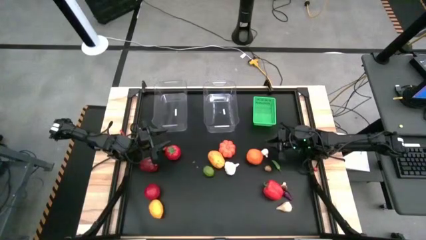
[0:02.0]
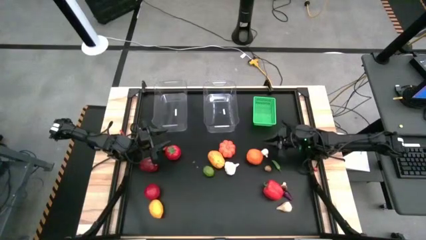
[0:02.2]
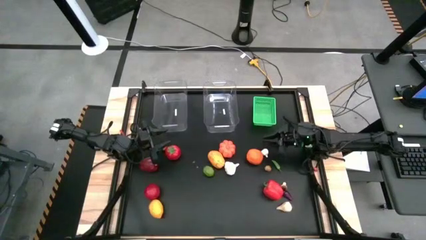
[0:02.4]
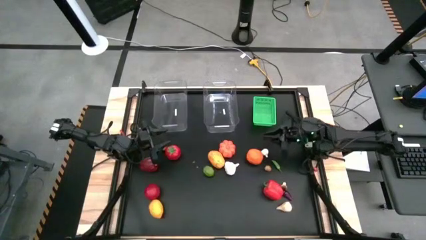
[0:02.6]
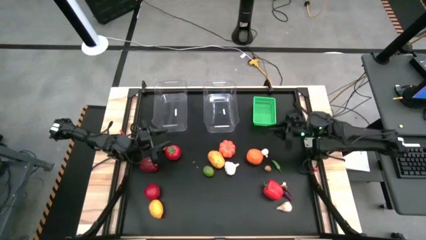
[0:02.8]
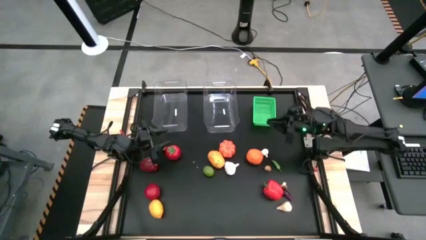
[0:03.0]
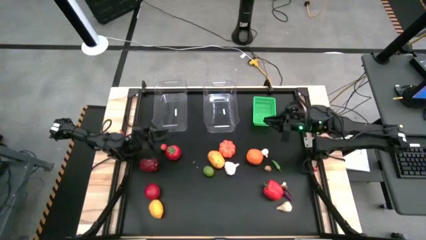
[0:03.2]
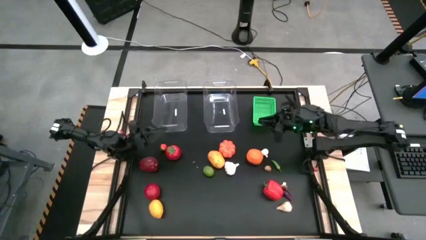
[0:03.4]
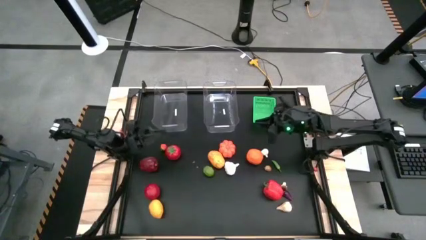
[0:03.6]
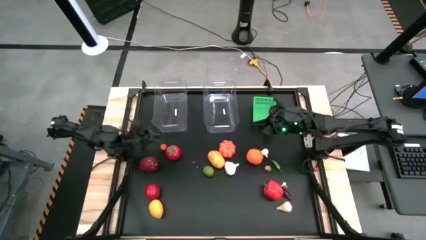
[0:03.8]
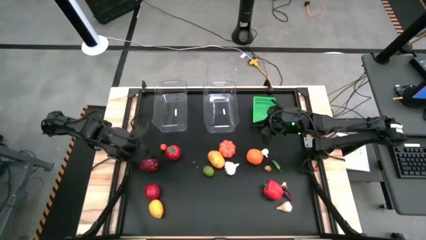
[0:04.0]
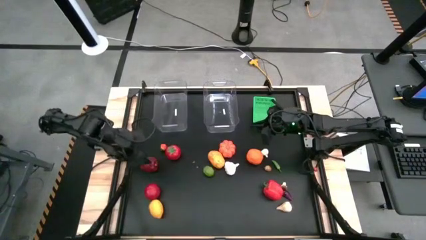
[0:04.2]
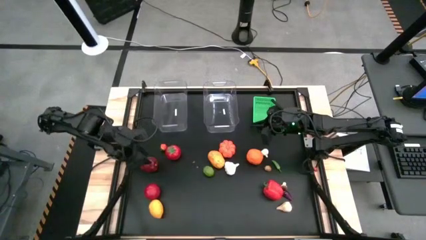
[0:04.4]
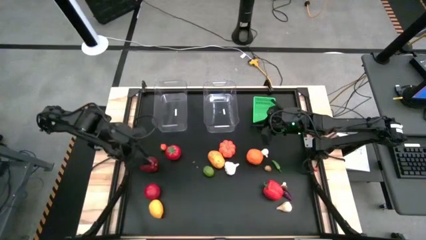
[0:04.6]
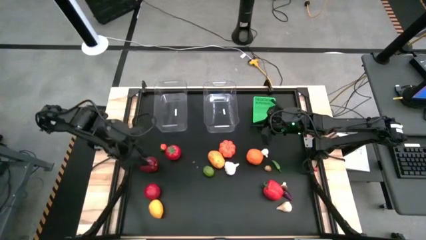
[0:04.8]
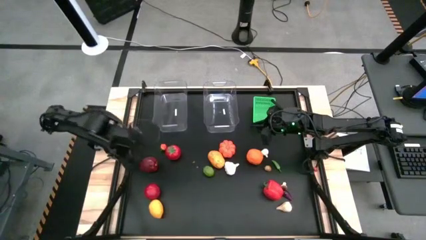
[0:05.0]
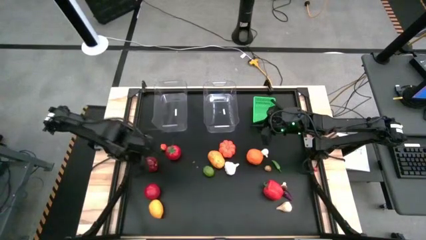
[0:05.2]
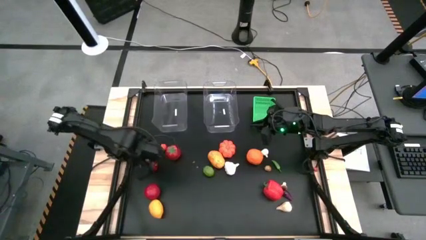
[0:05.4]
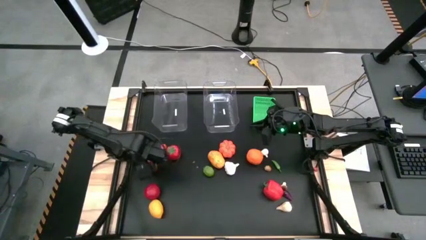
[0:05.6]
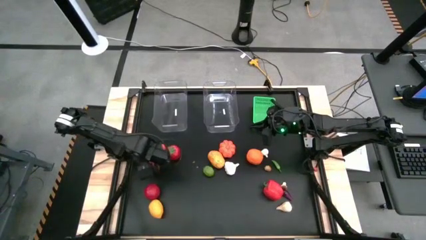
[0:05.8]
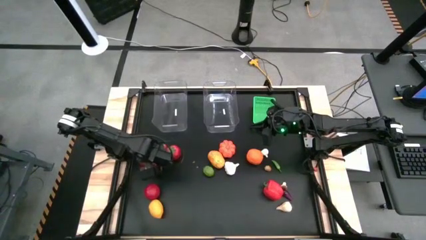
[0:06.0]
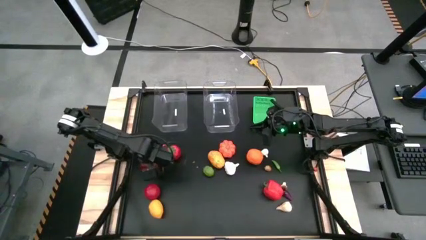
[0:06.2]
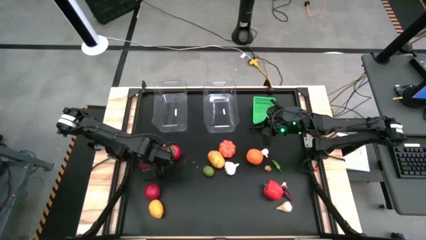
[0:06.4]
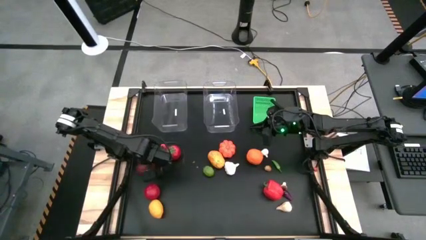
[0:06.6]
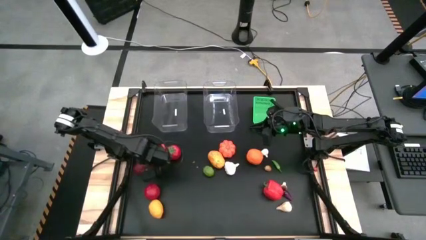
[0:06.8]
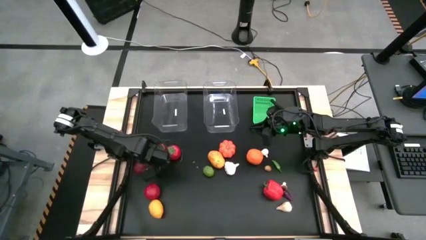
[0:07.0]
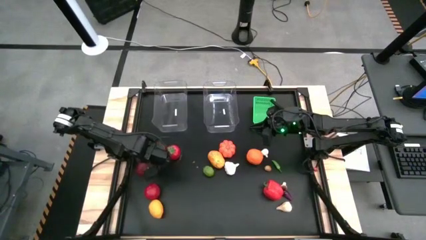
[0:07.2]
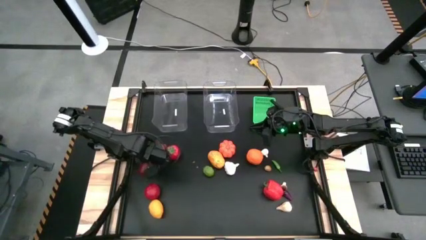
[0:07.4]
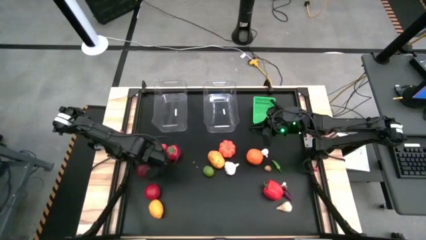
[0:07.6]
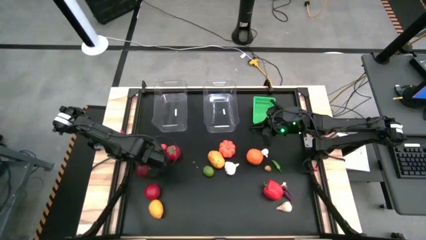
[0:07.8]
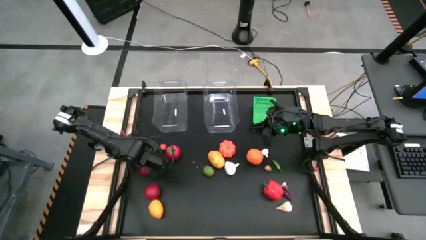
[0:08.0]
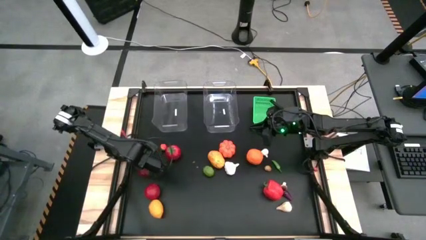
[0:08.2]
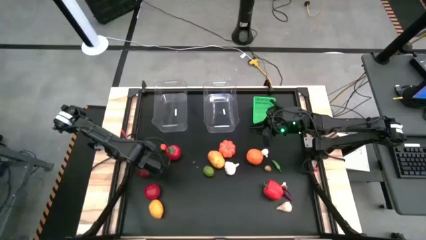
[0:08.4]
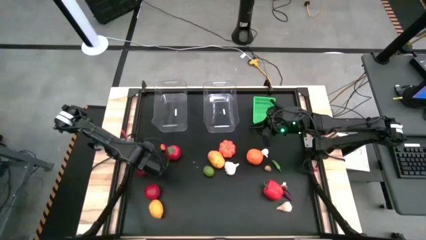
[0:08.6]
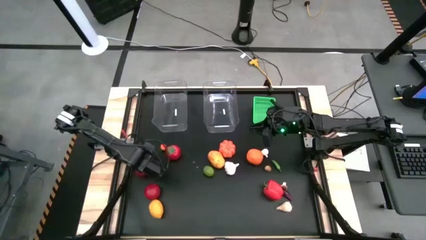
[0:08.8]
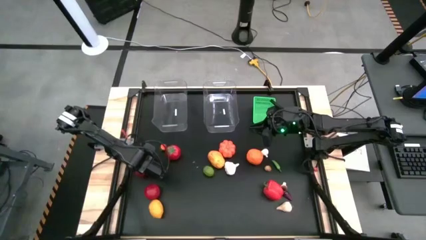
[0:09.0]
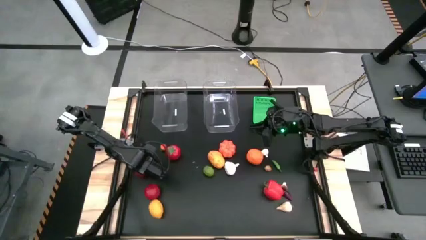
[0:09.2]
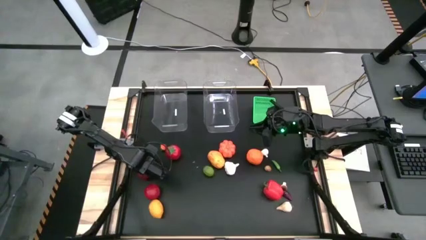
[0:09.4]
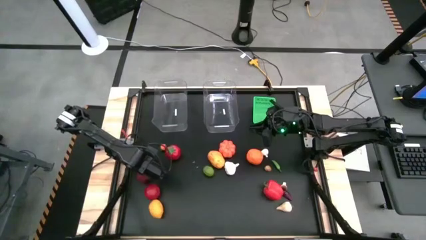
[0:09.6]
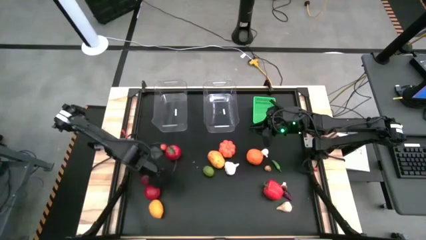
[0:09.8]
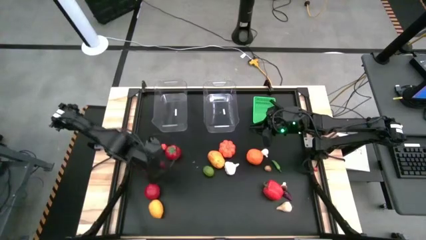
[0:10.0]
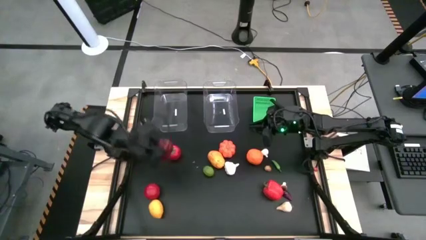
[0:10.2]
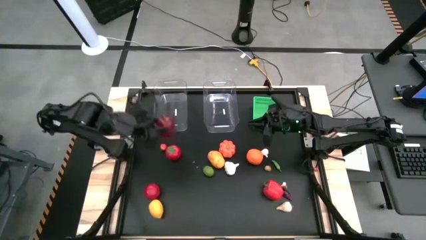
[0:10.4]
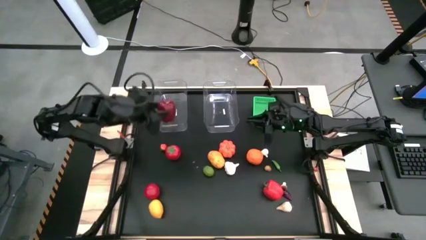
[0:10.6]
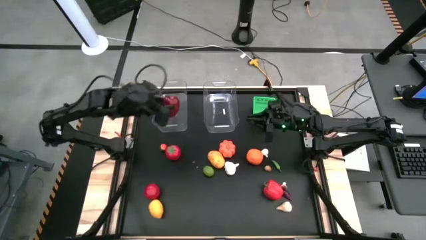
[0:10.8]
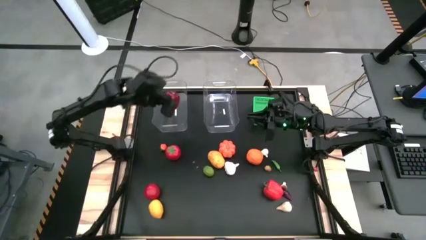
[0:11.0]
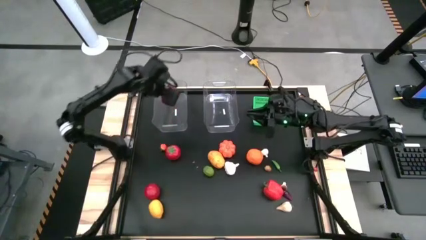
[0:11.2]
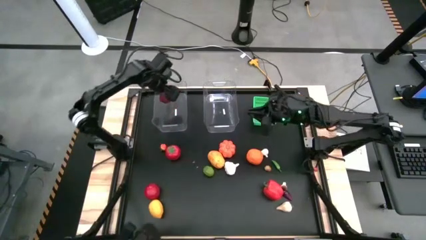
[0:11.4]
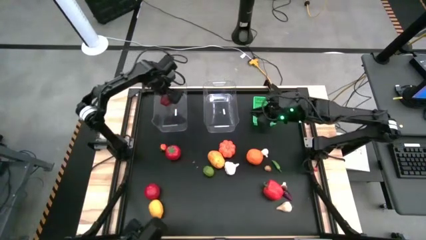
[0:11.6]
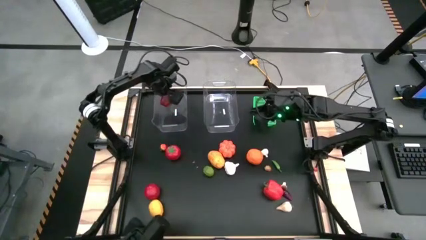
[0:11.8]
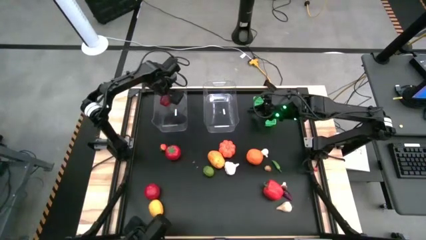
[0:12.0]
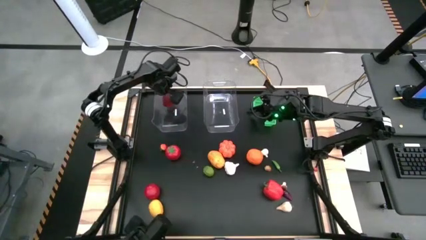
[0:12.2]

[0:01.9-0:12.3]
Task: Sort produce into baskets
Put the apple into the left transparent bin

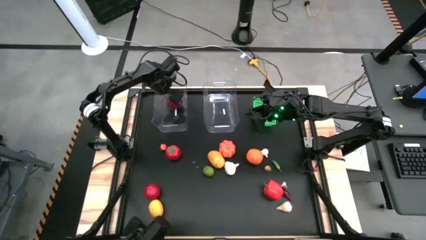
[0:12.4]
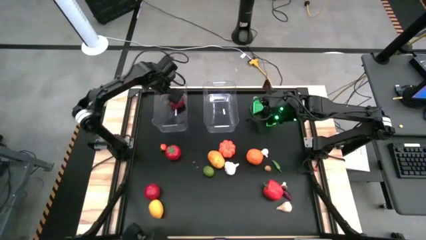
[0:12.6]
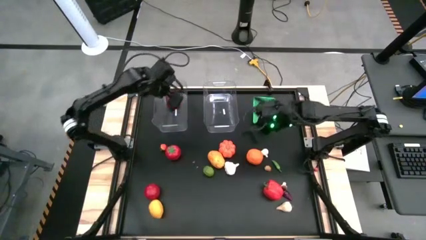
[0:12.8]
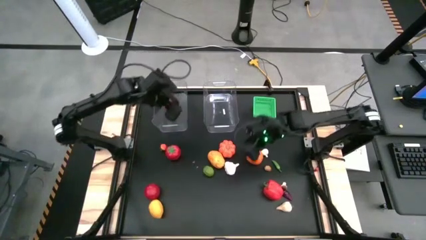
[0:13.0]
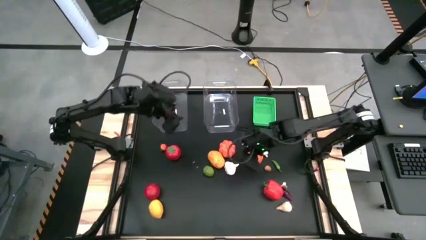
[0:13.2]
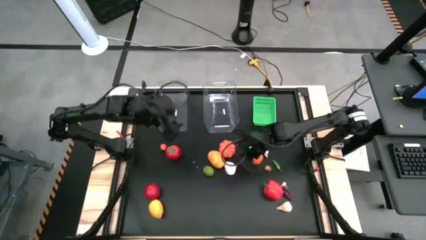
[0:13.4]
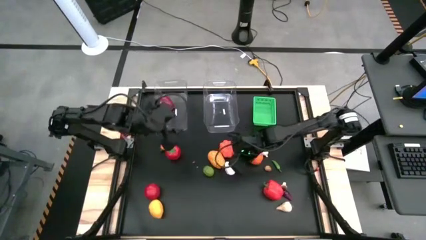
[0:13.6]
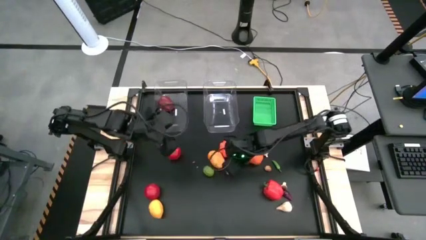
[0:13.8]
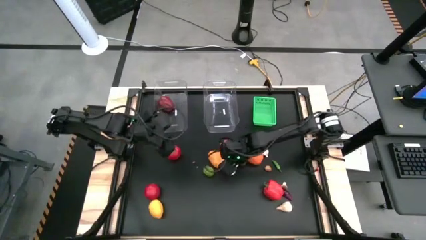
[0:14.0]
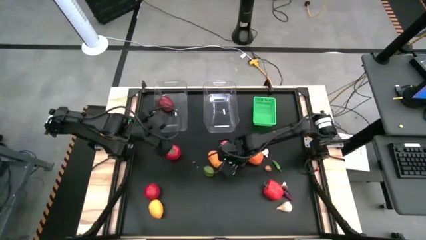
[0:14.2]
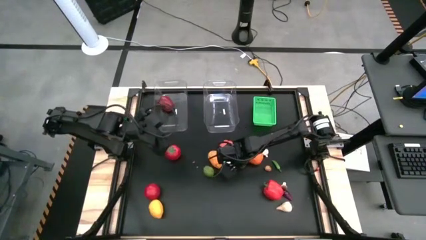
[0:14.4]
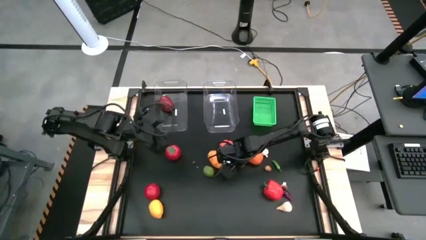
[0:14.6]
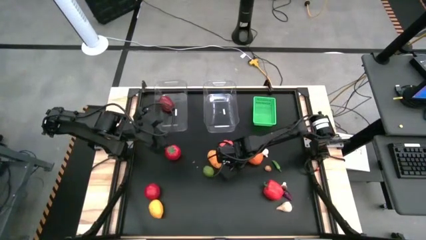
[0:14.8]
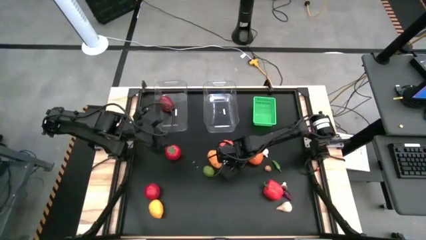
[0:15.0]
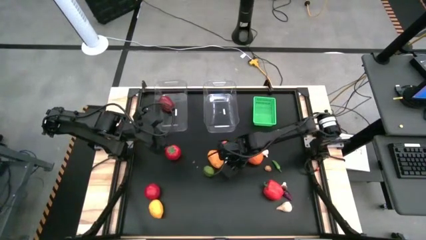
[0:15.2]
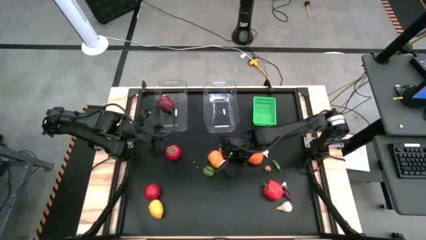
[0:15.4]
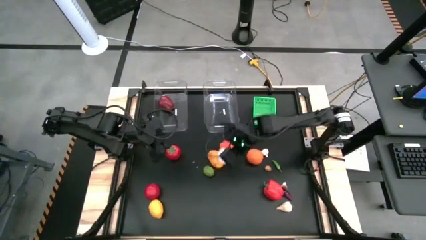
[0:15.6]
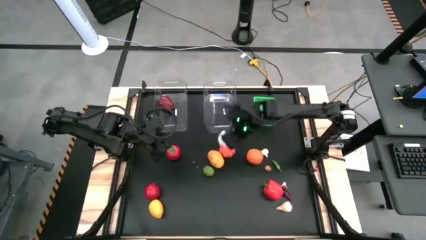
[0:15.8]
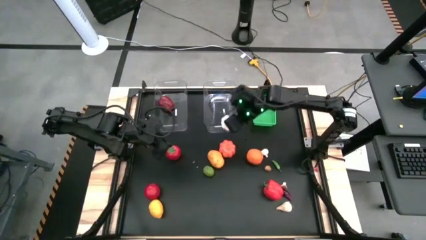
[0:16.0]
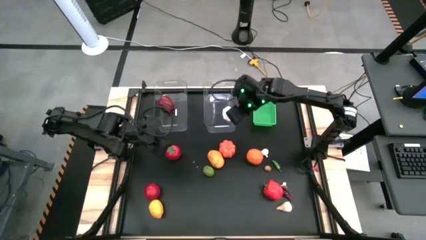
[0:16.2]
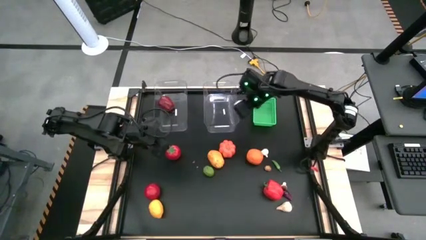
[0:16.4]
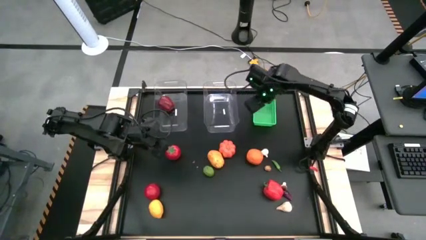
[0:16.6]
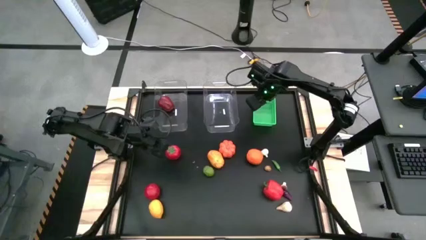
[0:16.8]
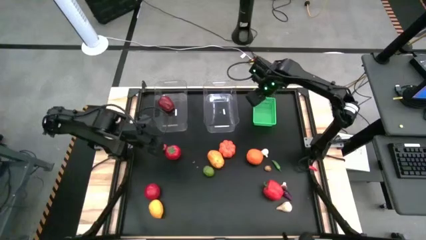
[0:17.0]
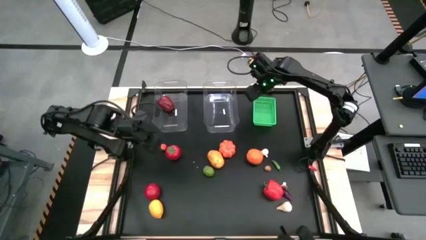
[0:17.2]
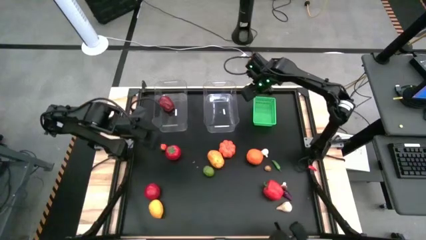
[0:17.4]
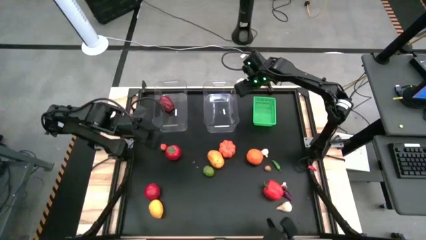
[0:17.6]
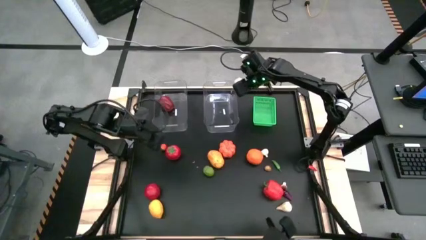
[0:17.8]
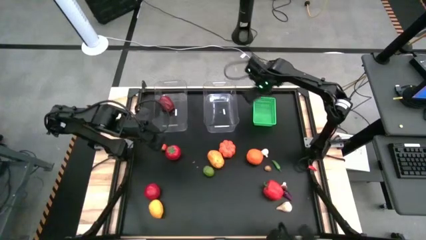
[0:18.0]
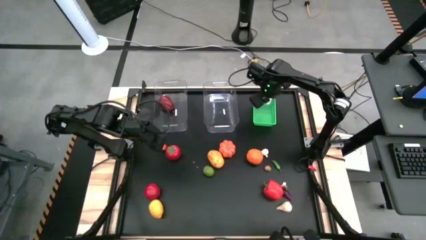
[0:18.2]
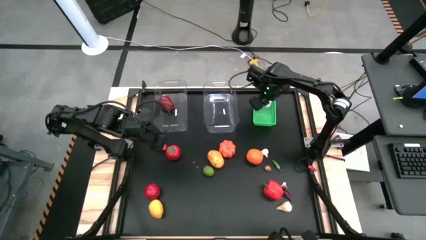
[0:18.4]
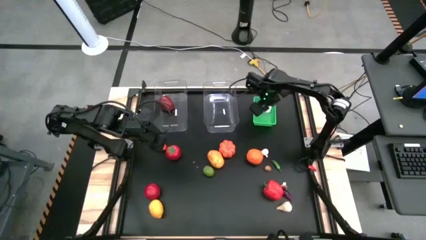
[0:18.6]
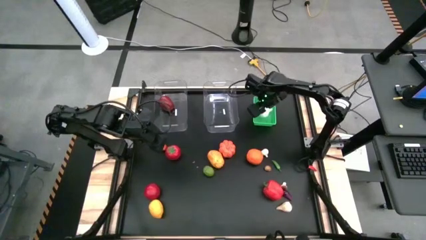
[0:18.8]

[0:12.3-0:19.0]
Put the middle left garlic into the green bin
